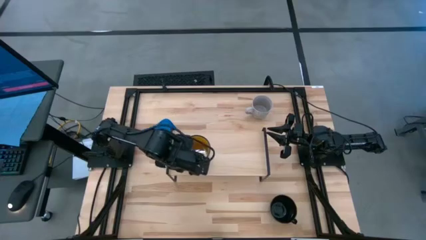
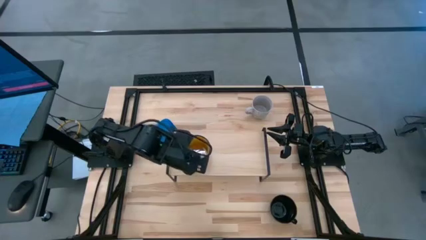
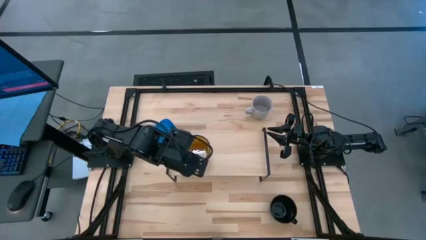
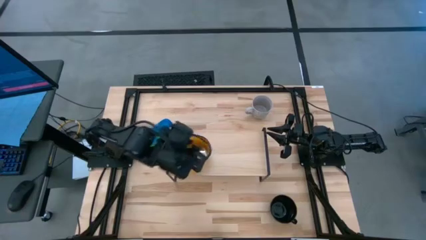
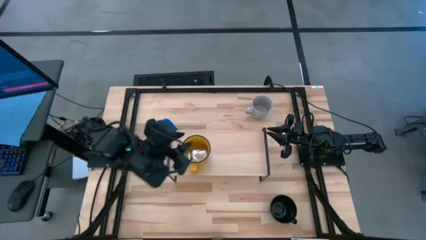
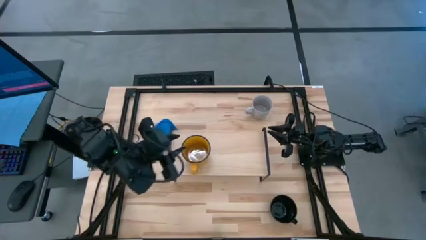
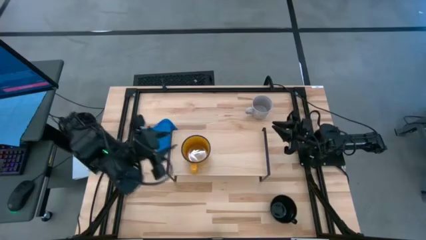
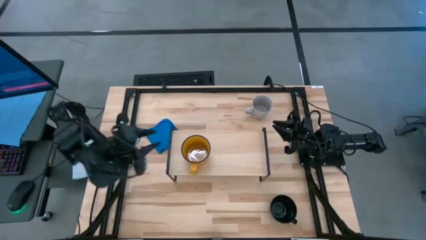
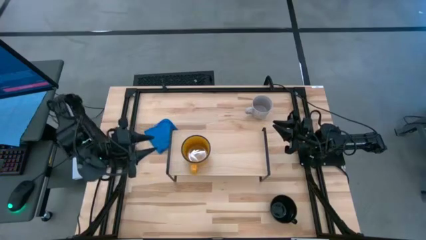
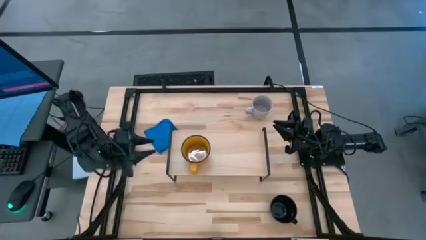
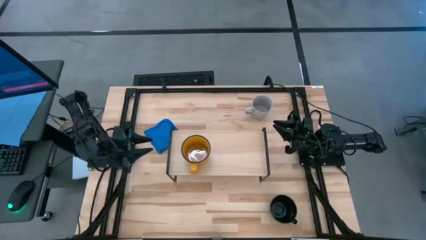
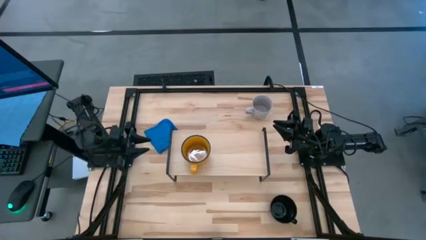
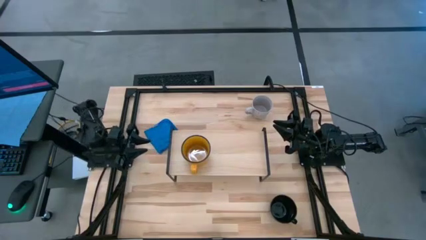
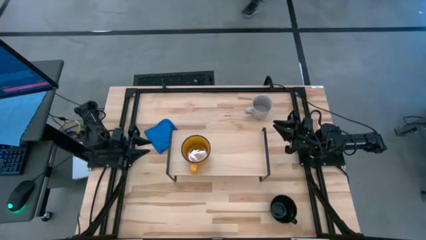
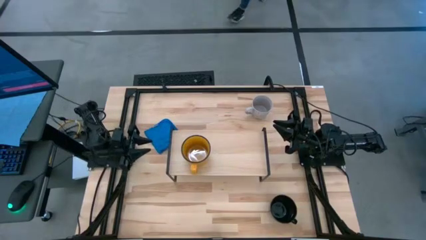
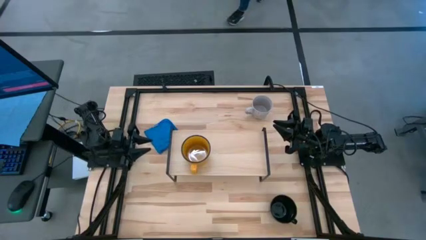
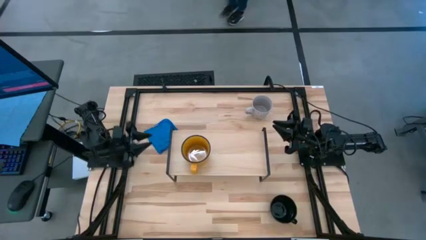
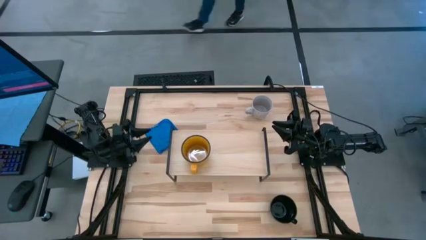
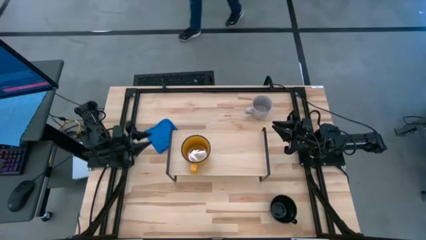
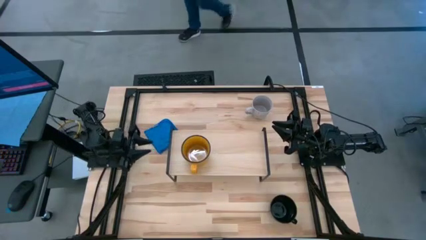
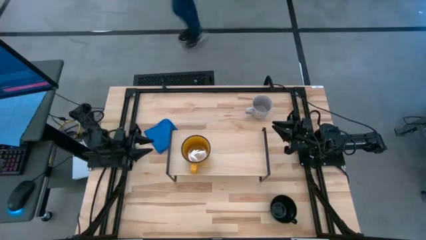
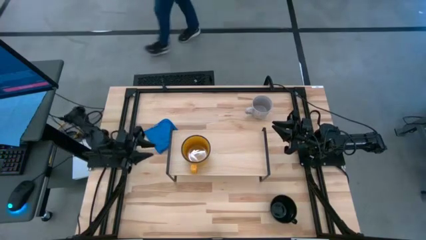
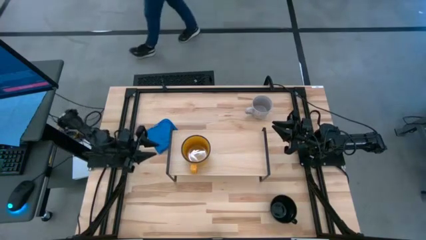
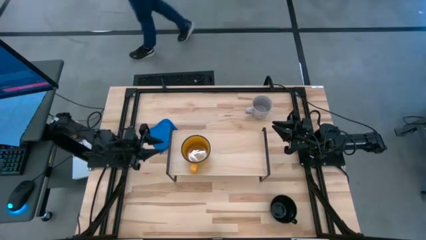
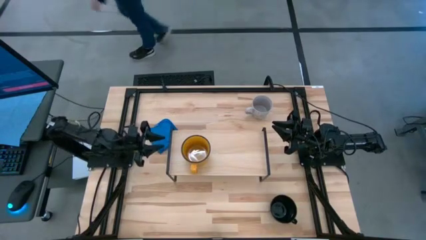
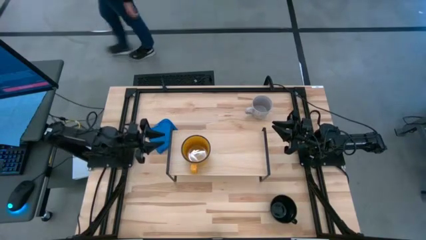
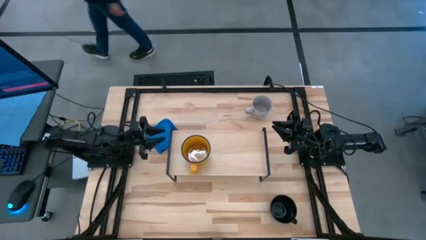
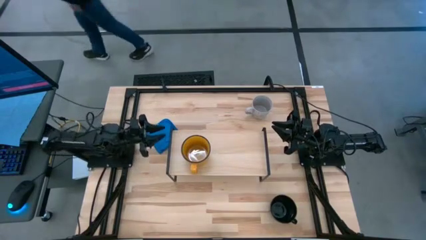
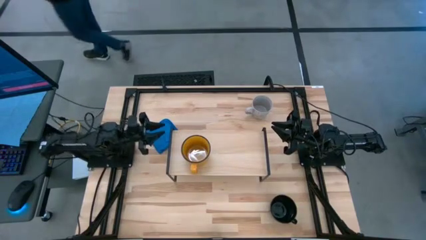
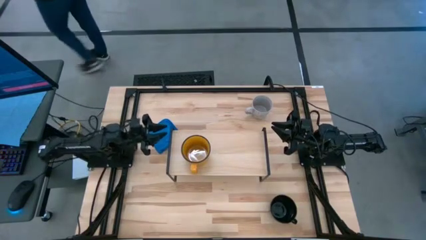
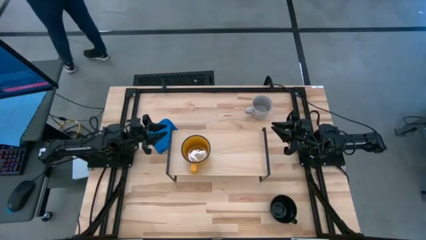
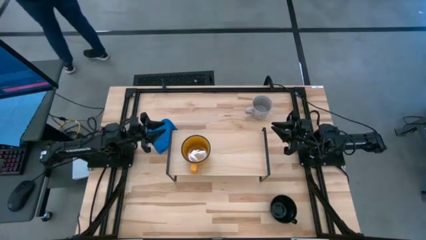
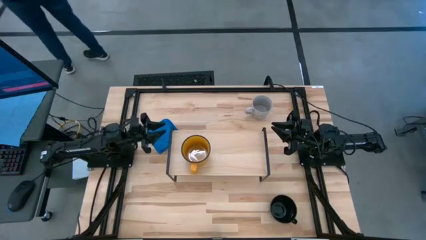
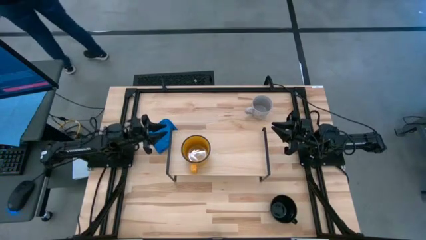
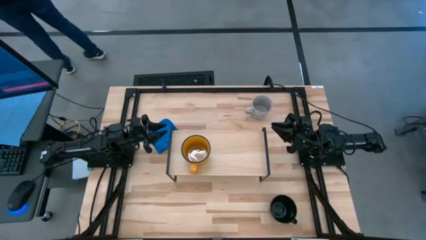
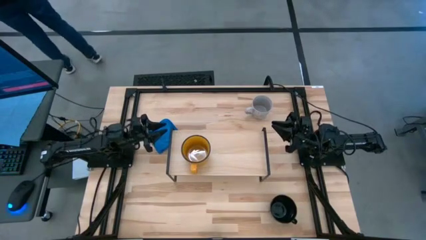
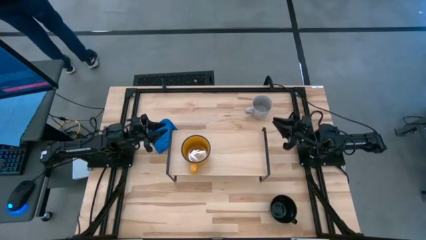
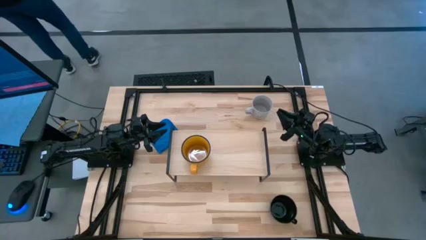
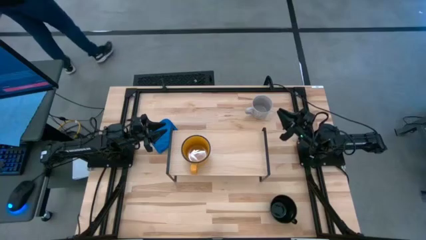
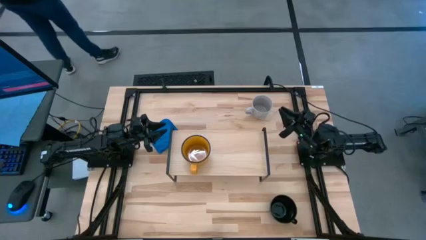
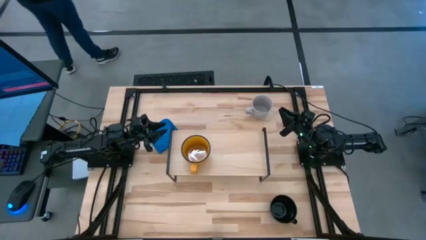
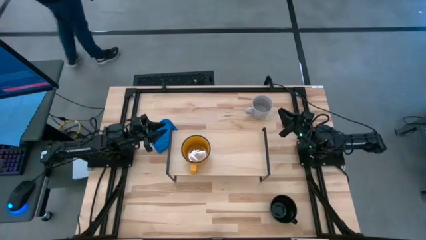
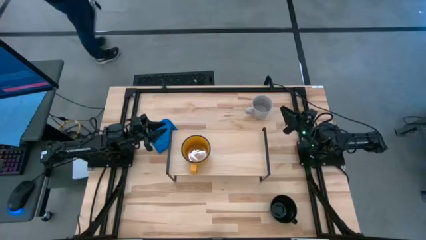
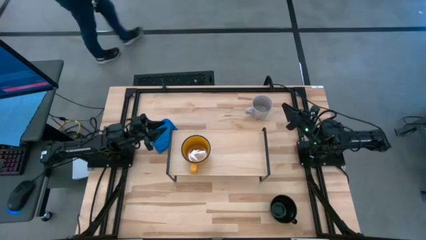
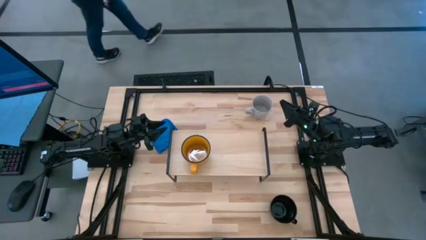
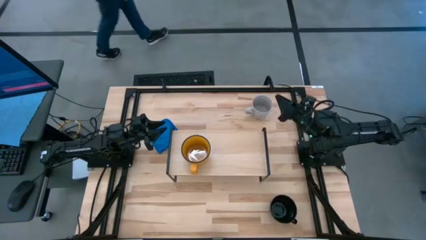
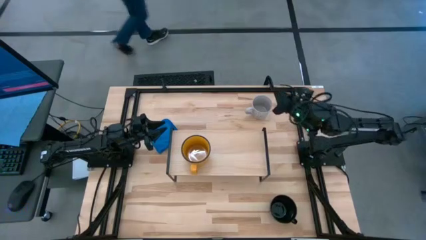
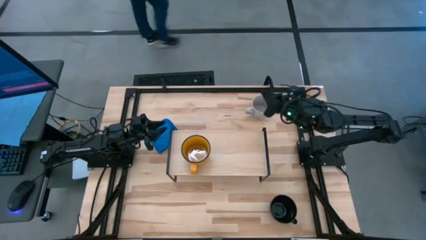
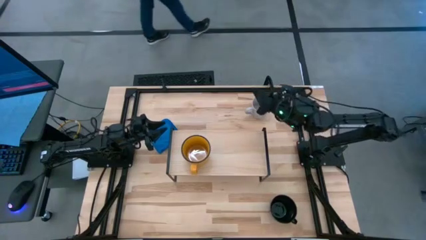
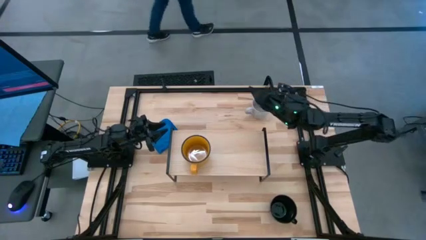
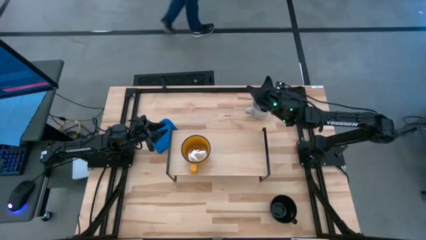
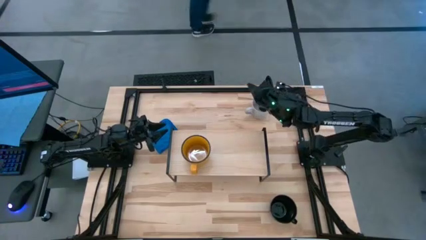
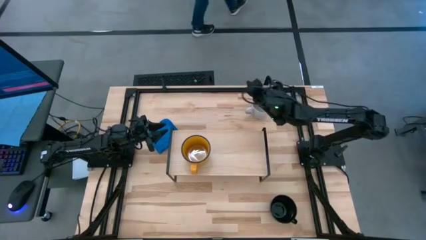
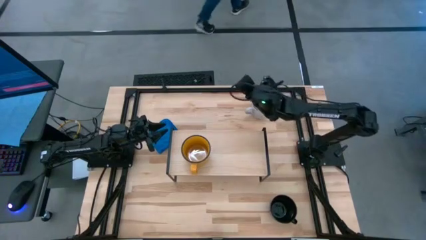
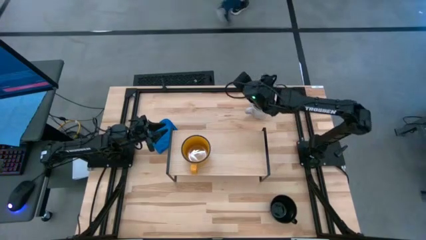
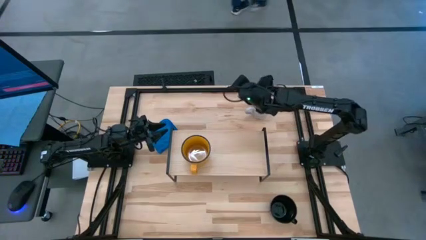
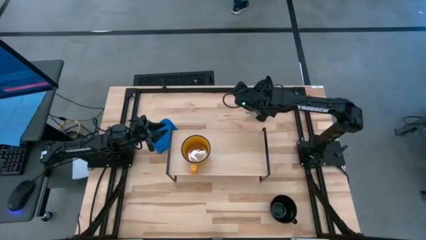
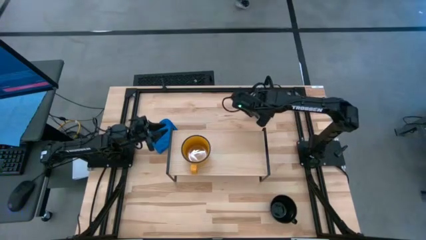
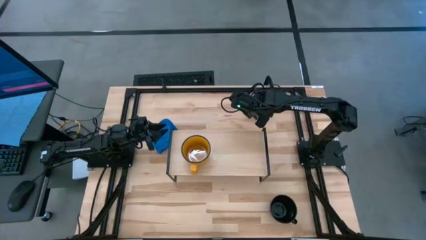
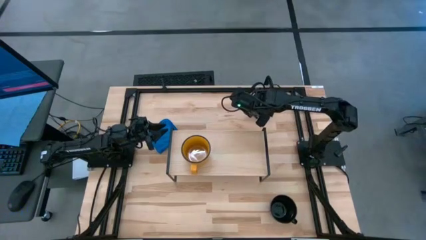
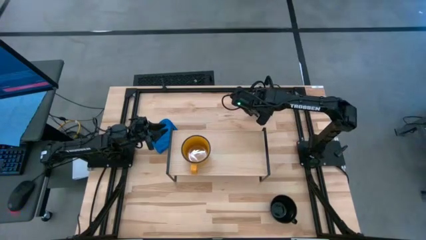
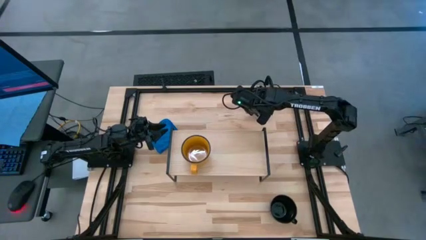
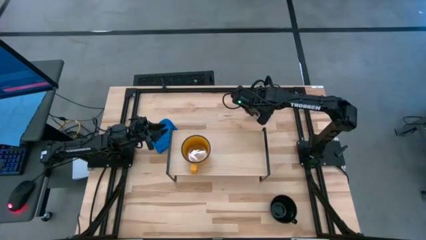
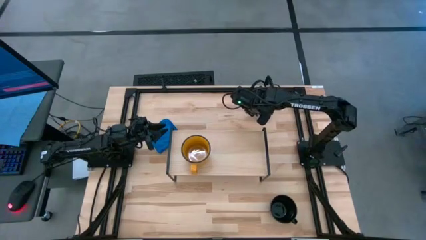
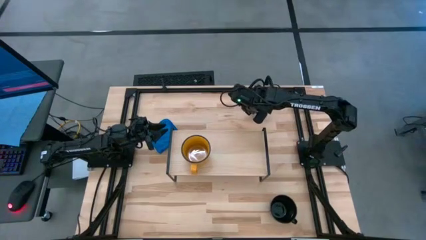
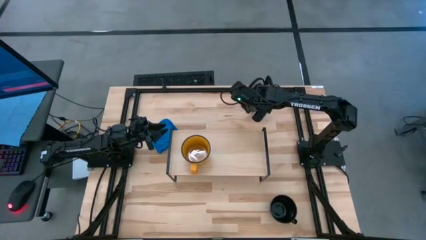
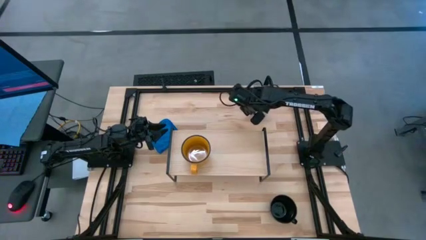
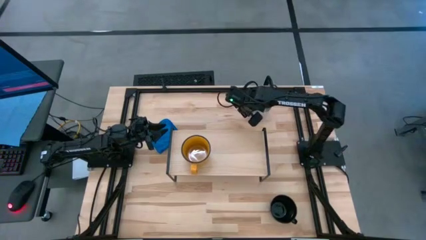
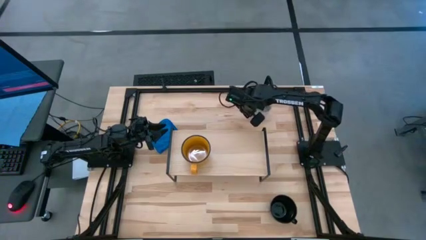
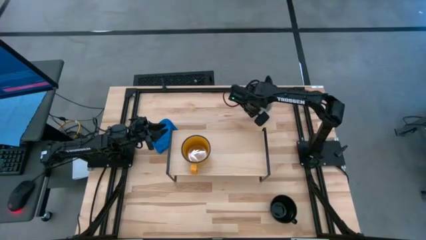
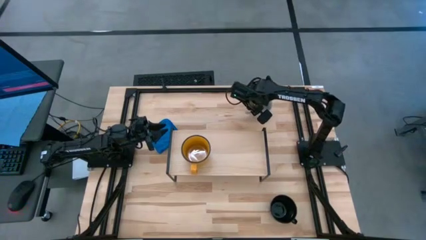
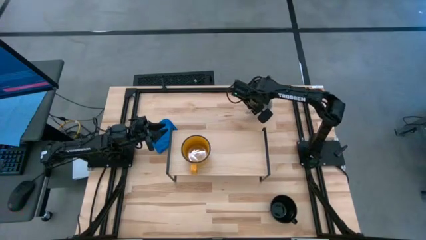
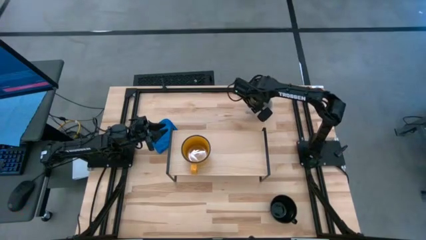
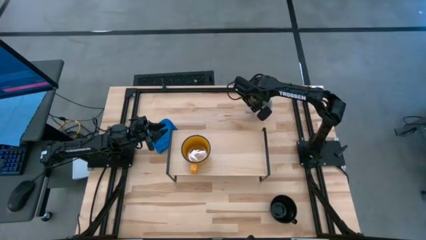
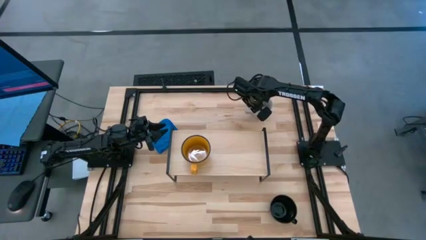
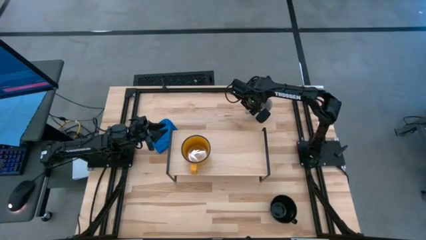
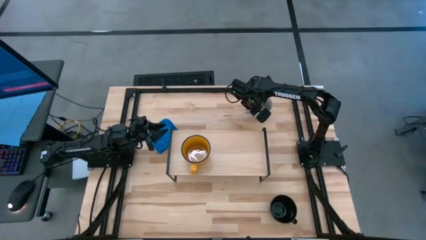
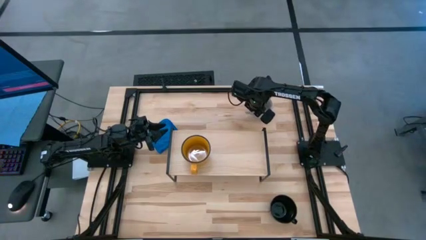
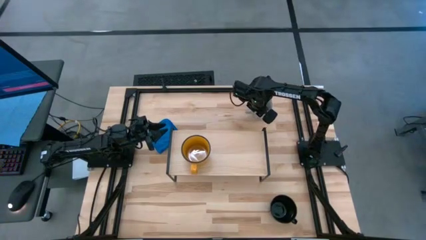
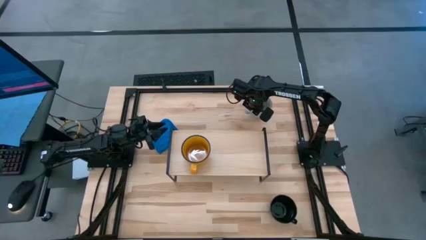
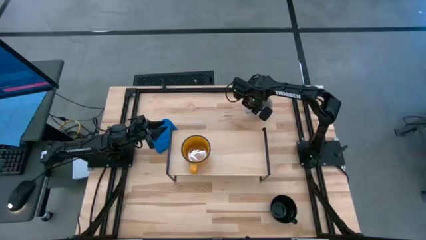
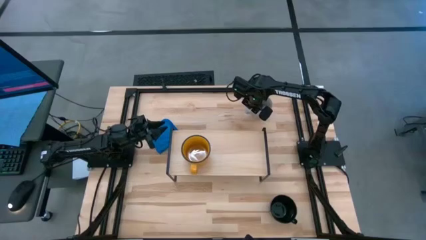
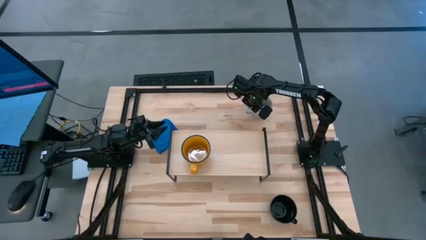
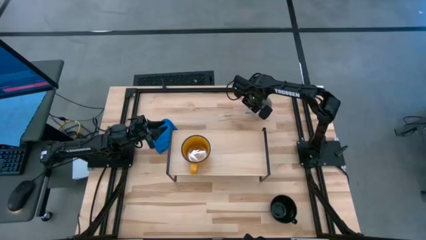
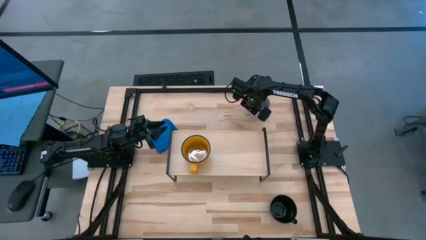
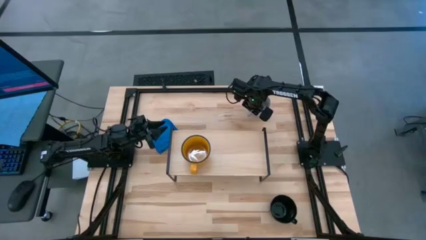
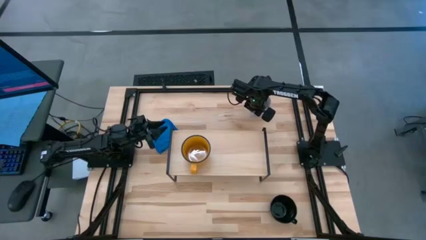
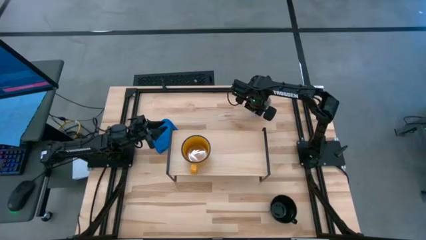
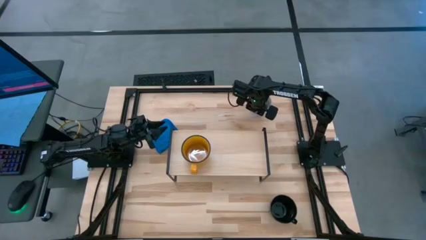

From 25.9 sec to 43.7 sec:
Task: Stack small to large cups/mugs on shelf
Put the gray cup on the shelf
